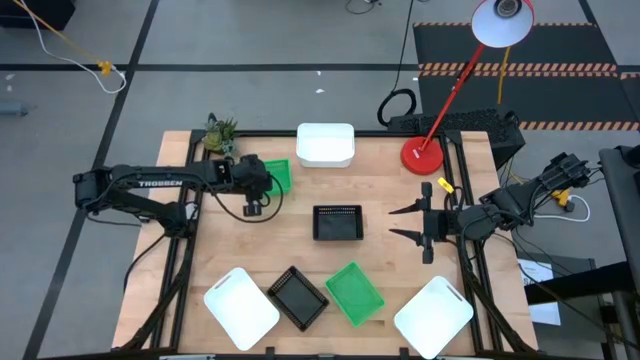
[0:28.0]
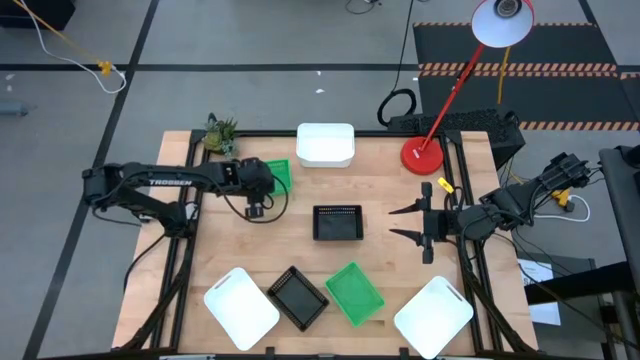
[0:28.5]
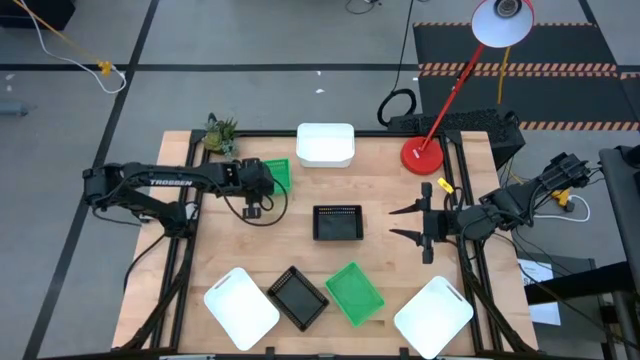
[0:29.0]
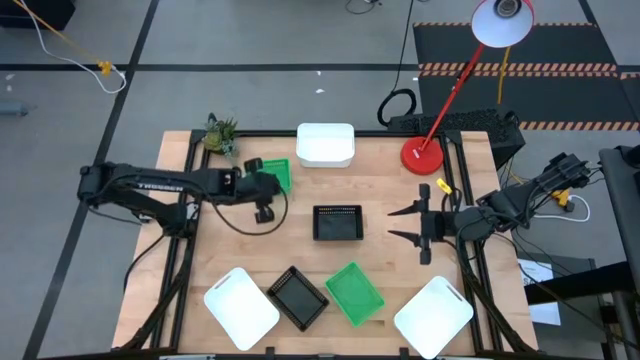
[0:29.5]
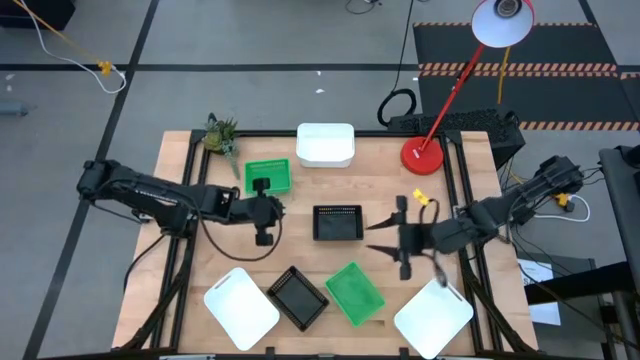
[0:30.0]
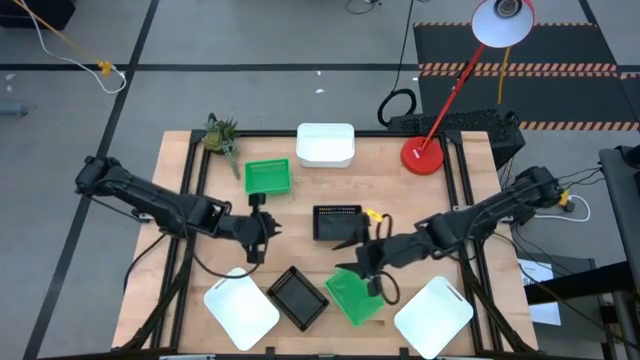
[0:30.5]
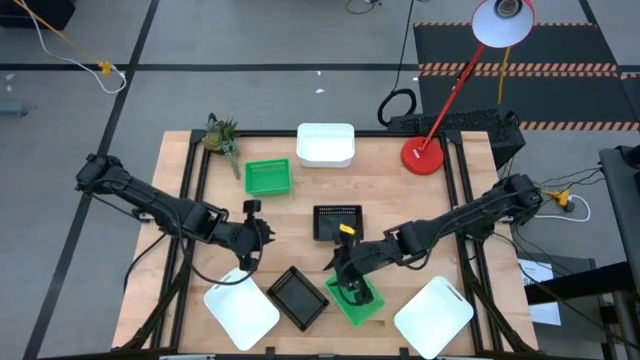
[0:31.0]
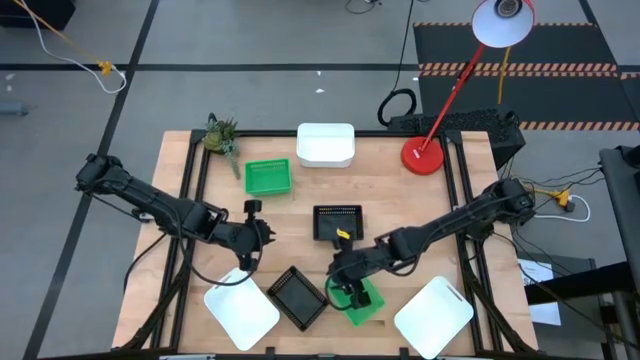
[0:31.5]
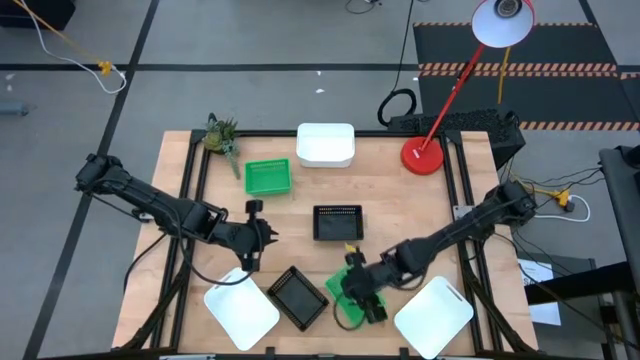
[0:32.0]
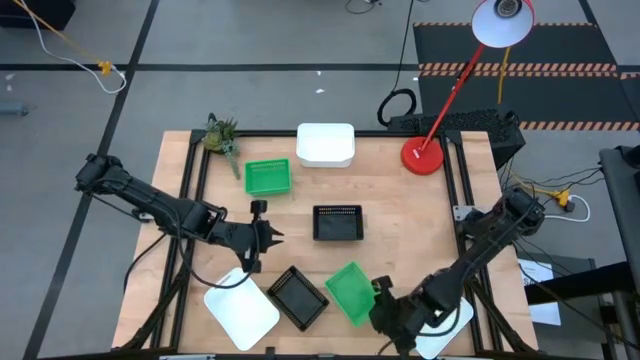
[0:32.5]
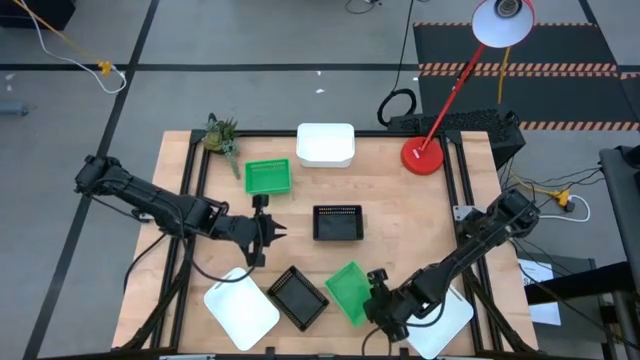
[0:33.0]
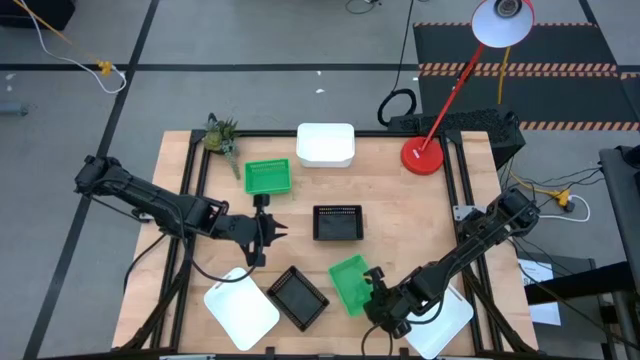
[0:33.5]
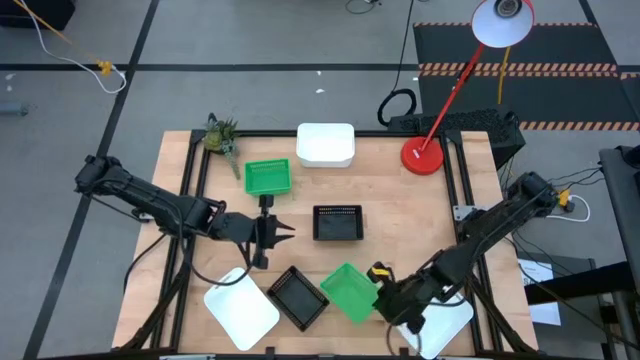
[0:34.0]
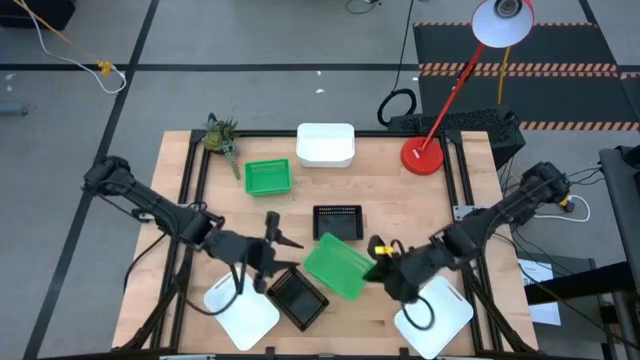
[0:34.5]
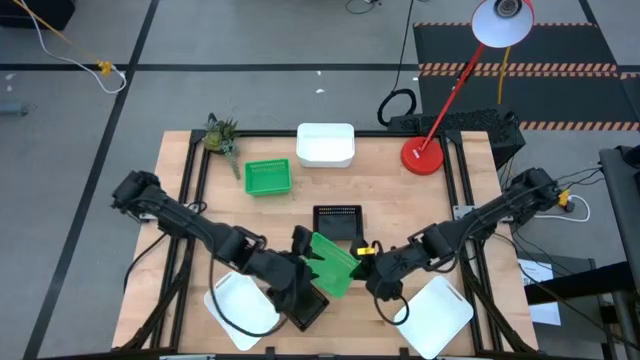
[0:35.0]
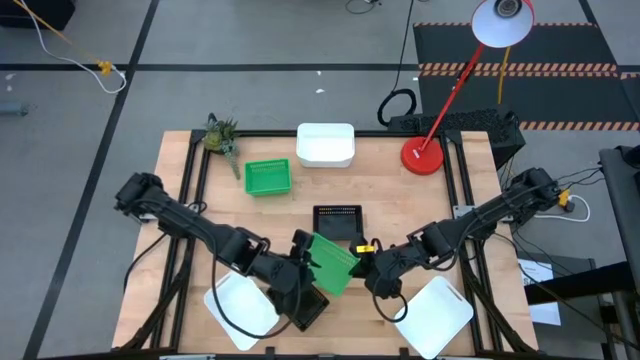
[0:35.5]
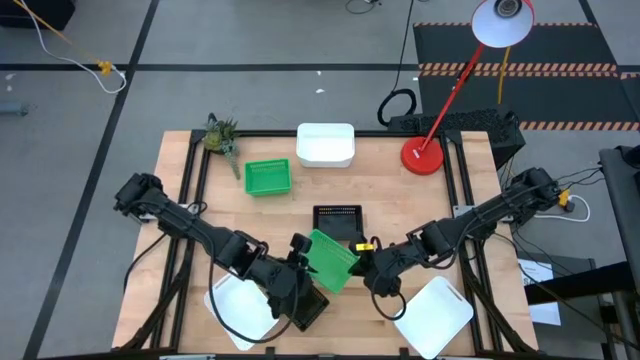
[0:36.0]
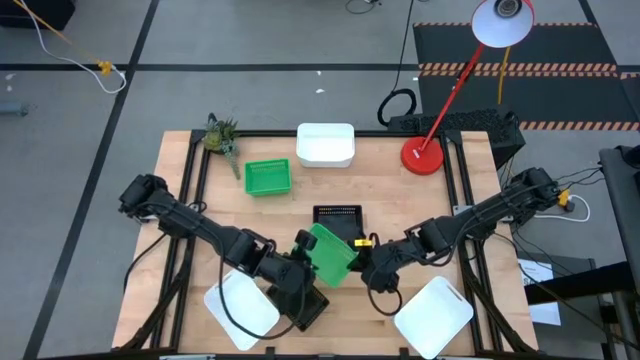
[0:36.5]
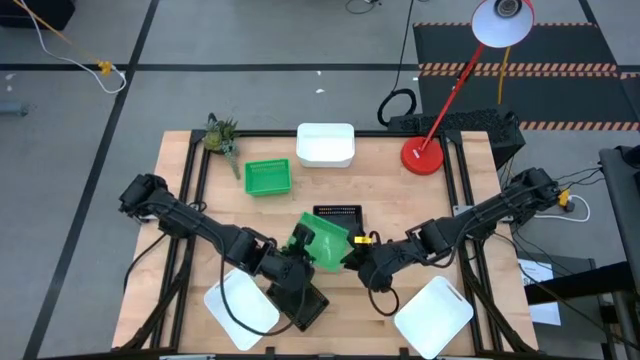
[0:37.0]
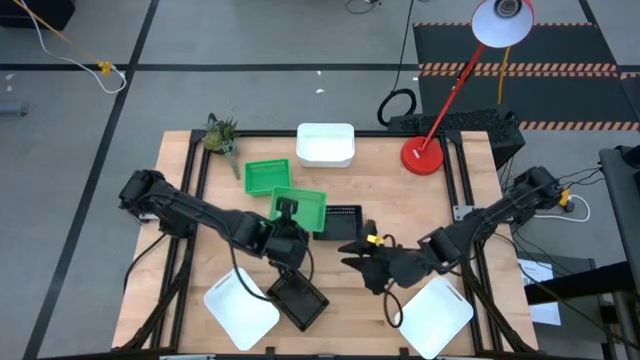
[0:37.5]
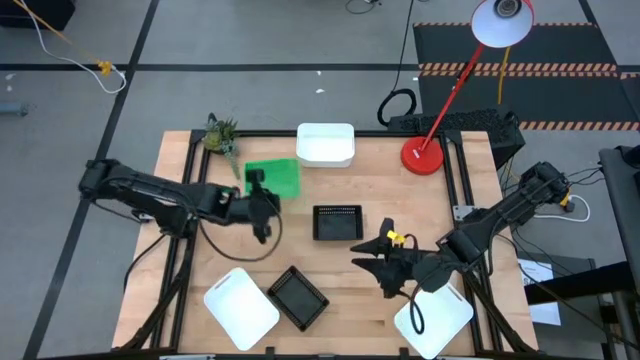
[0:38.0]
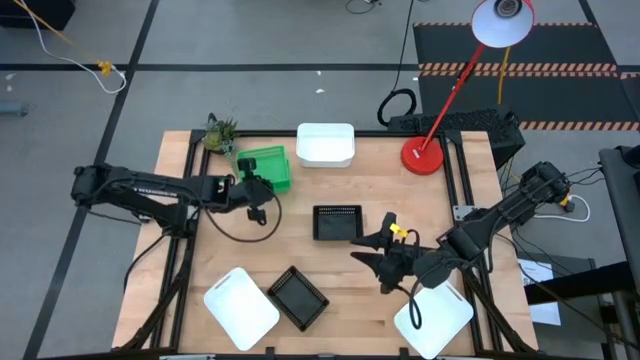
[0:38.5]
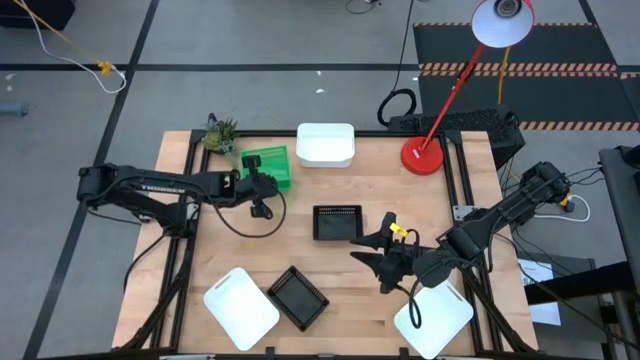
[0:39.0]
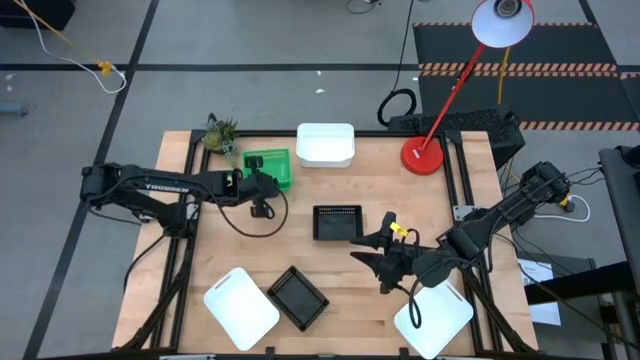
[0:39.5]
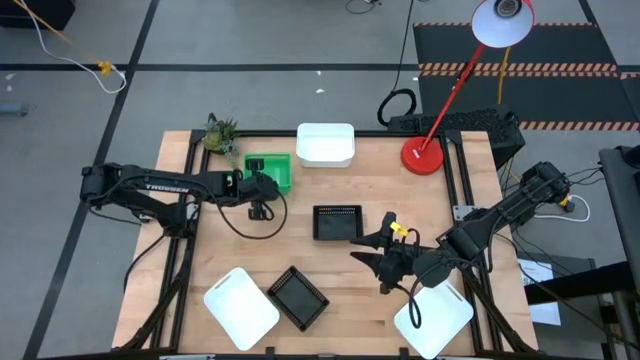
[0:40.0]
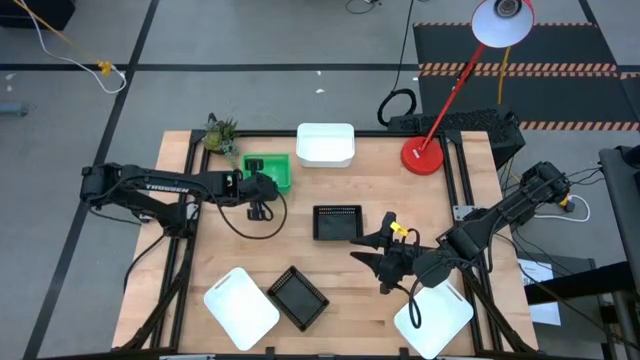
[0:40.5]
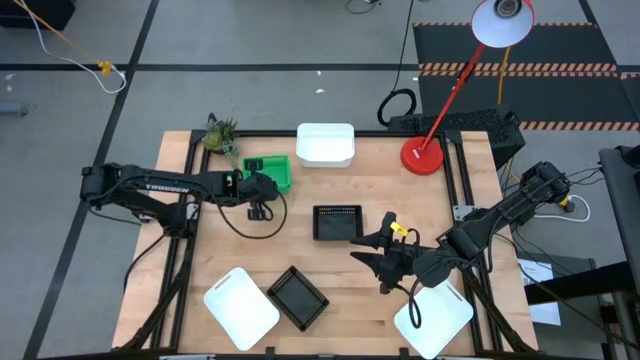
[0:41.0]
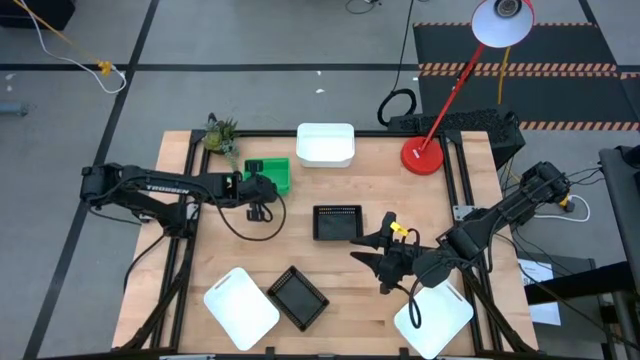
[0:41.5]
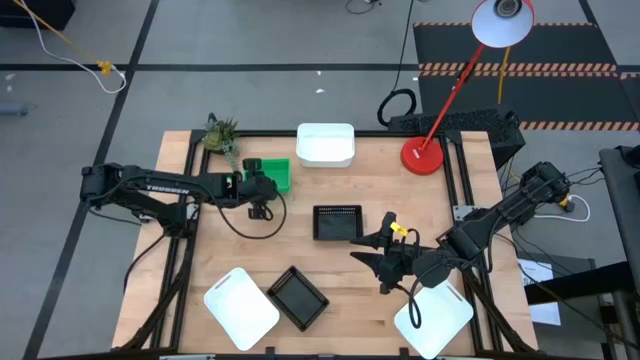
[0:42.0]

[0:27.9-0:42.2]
Stack the bottom green bin on the stacked green bins
